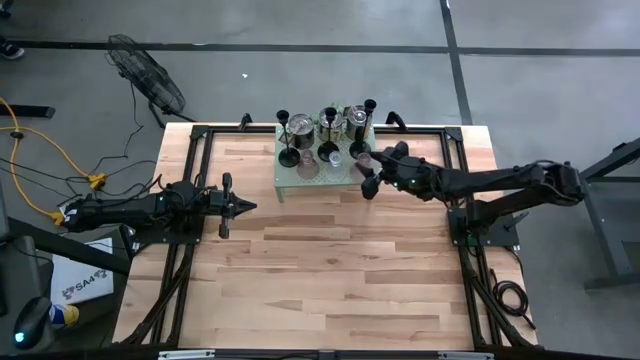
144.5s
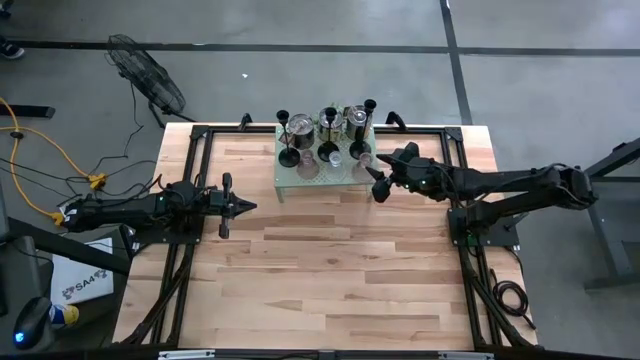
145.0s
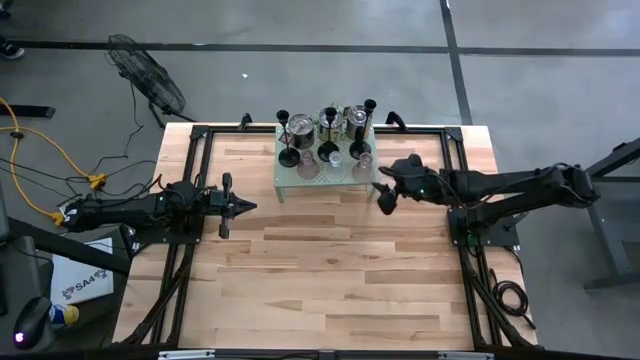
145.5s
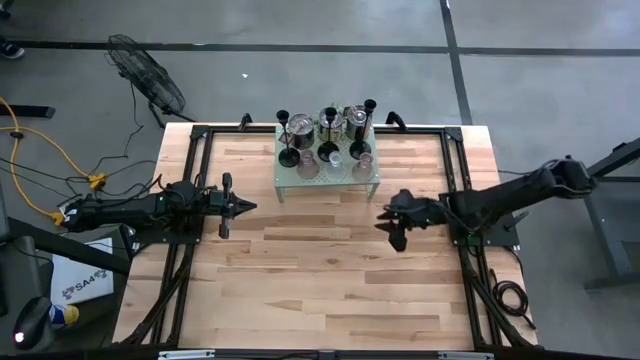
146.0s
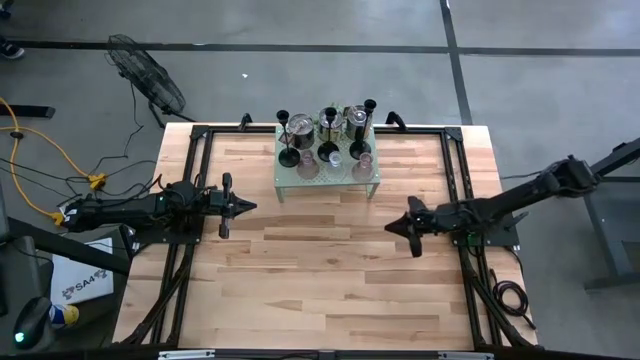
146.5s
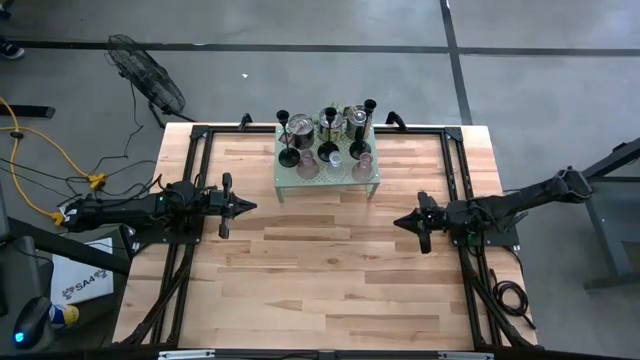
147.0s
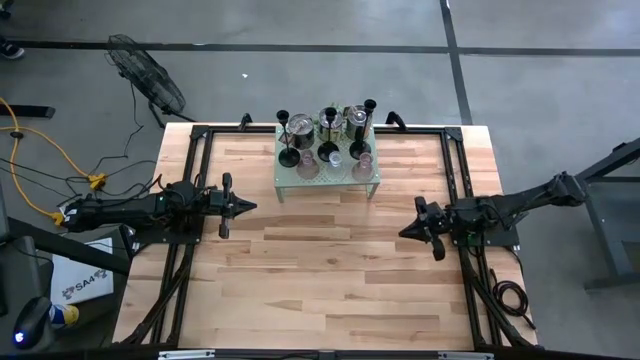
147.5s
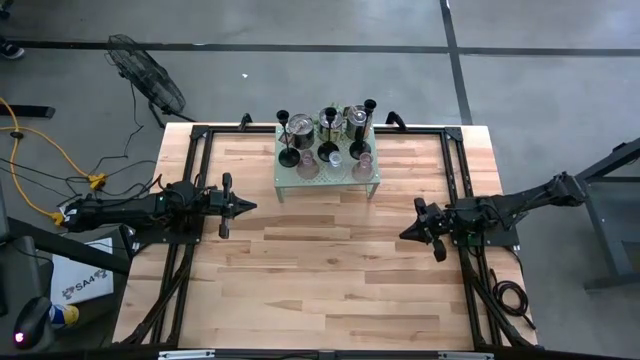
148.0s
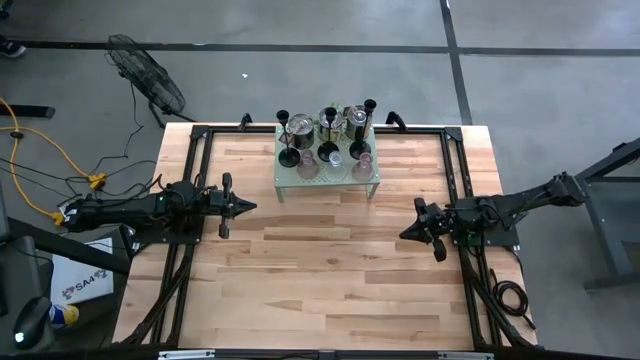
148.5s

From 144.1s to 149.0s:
Task: Pick & Place candle stick holders
Return to Home Position

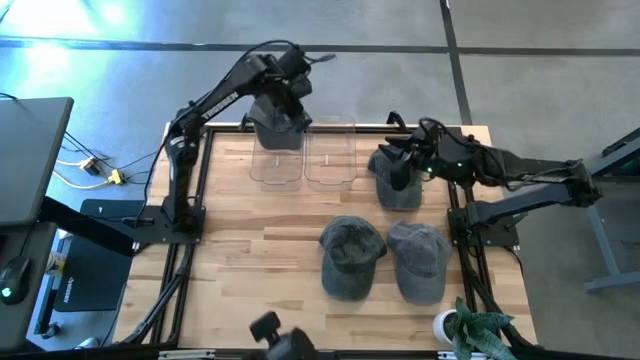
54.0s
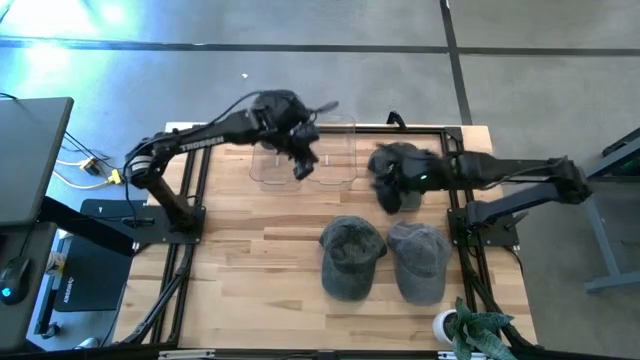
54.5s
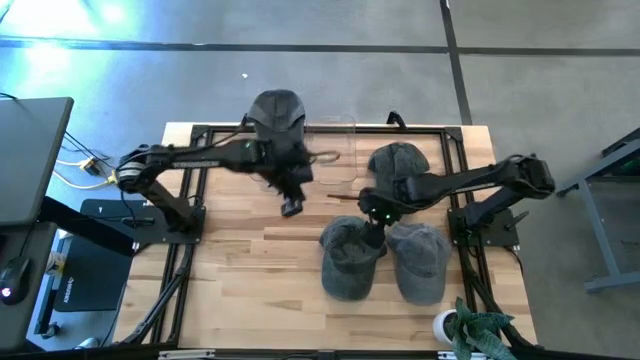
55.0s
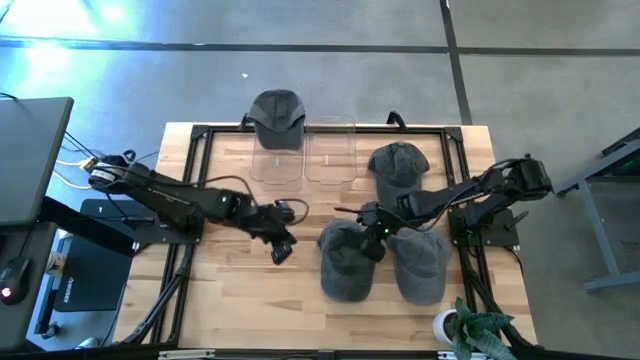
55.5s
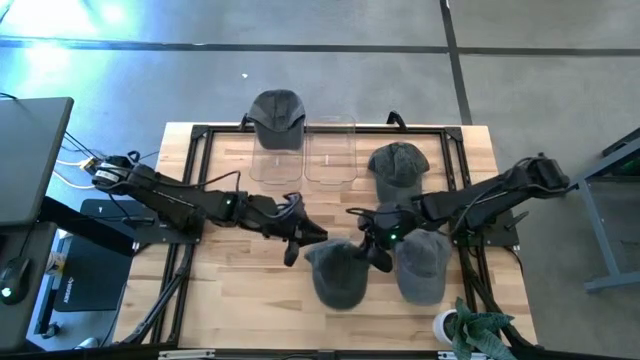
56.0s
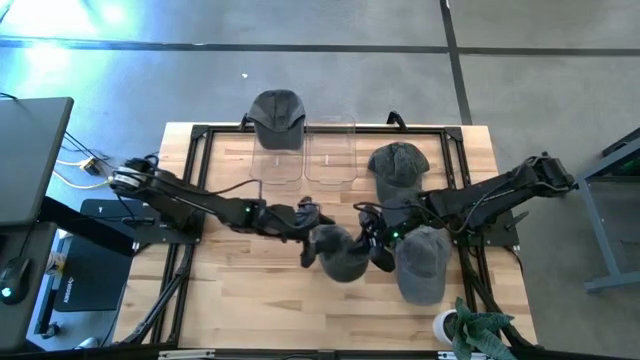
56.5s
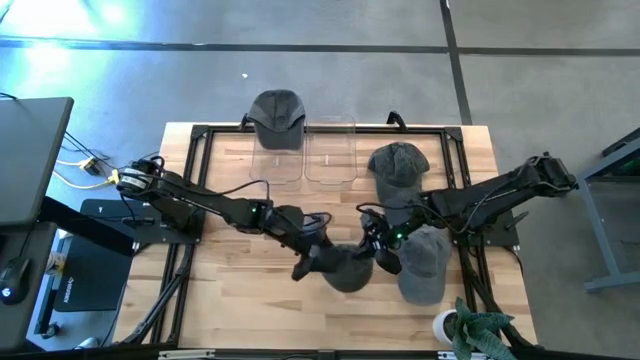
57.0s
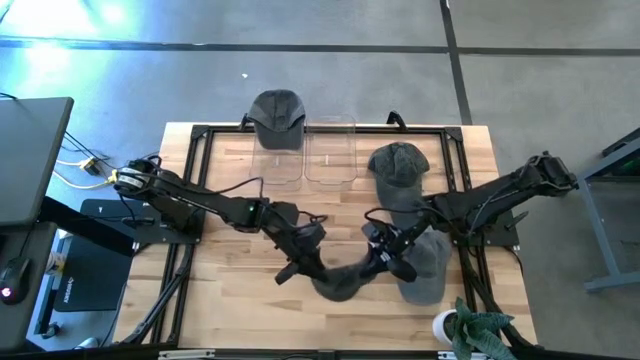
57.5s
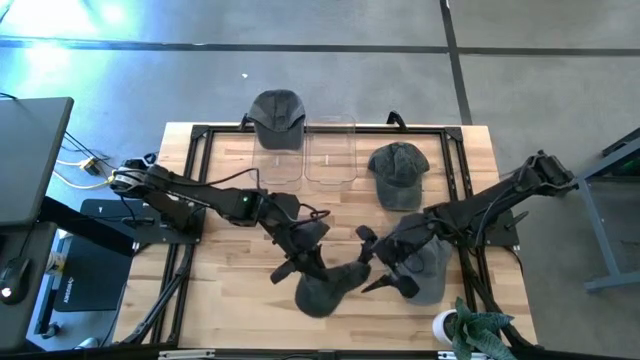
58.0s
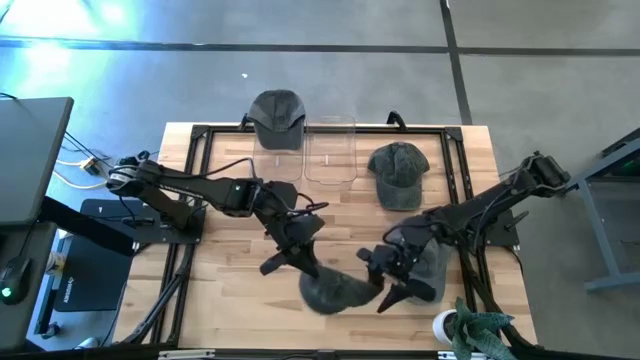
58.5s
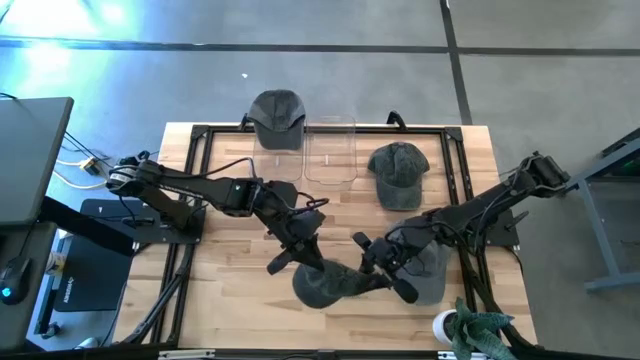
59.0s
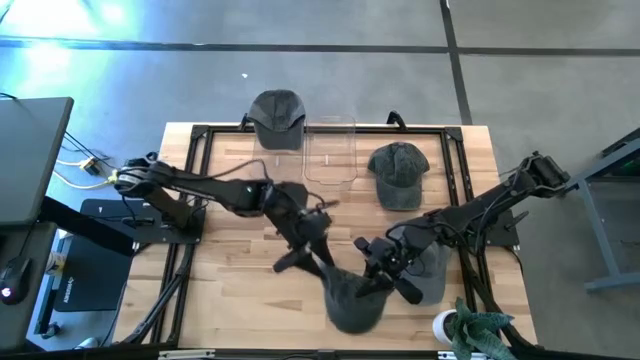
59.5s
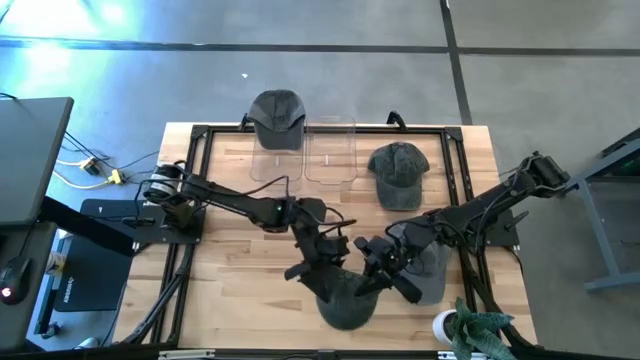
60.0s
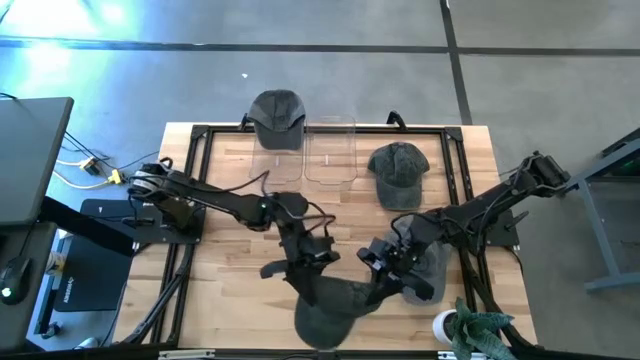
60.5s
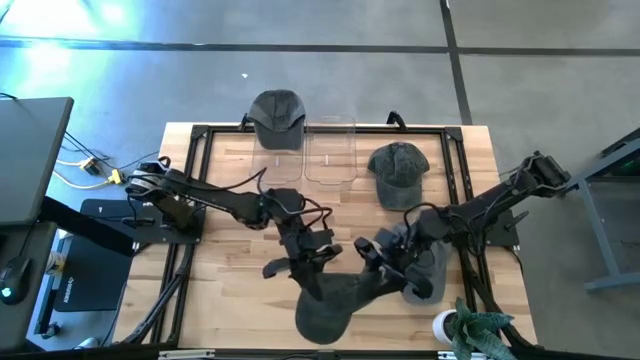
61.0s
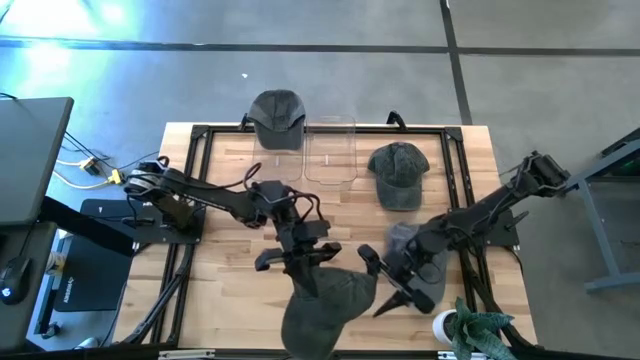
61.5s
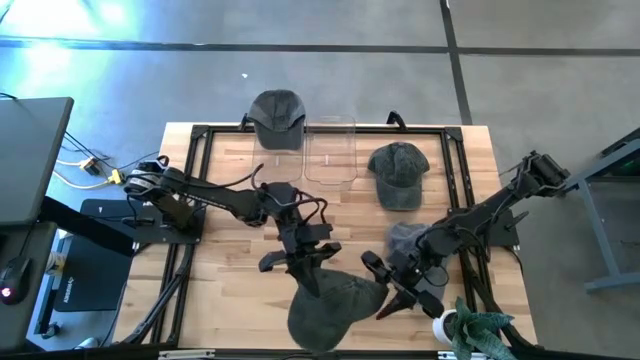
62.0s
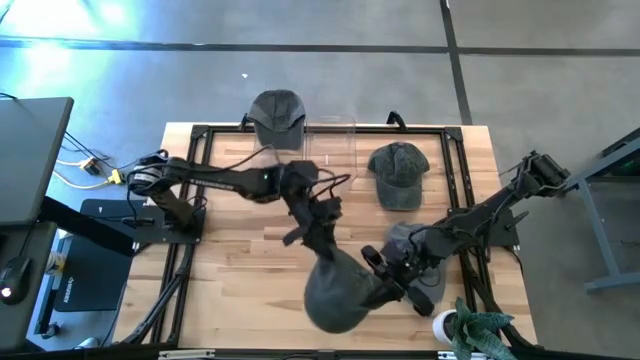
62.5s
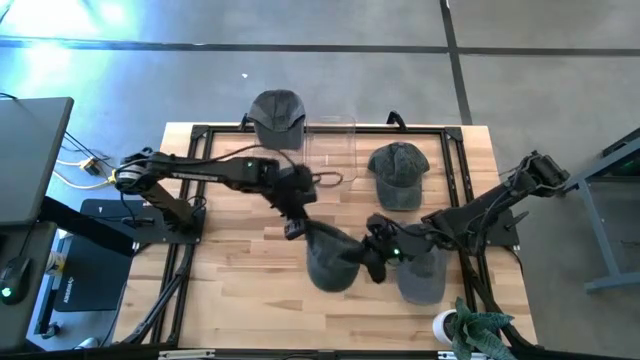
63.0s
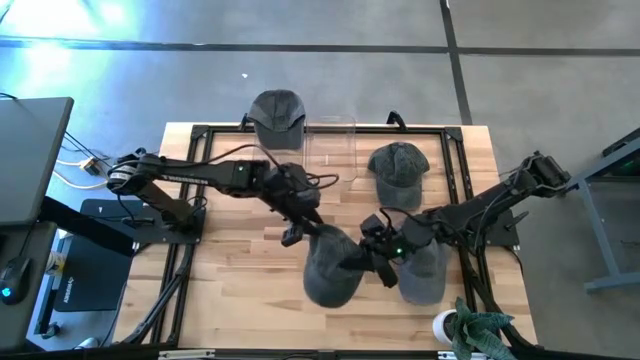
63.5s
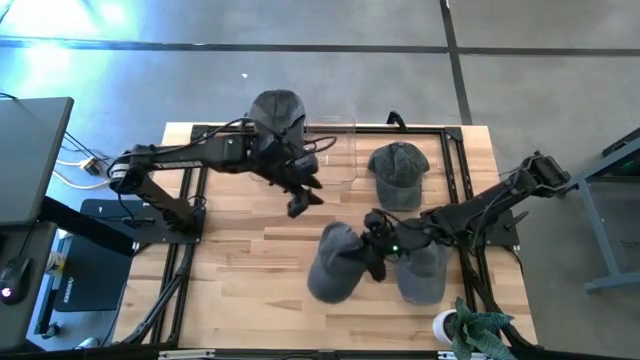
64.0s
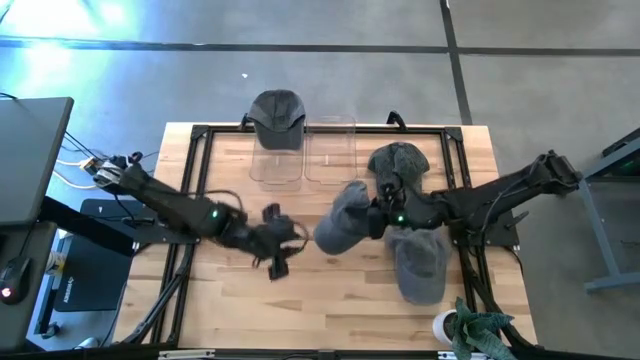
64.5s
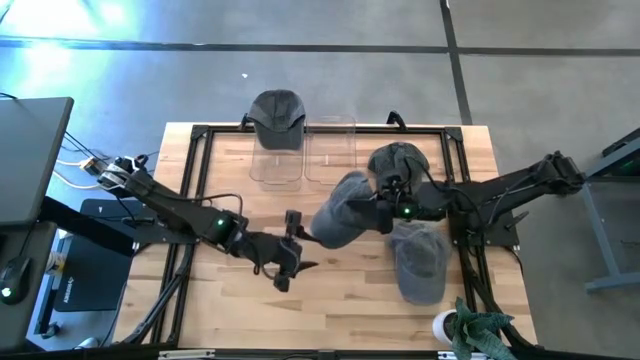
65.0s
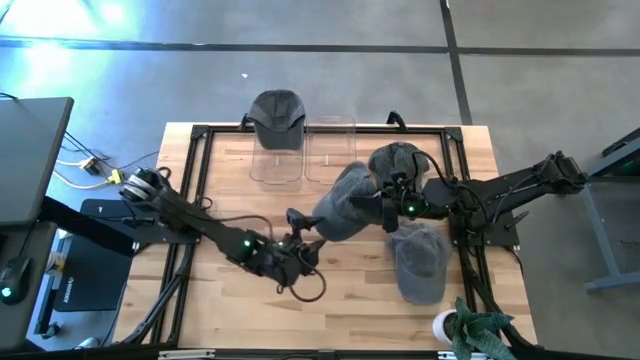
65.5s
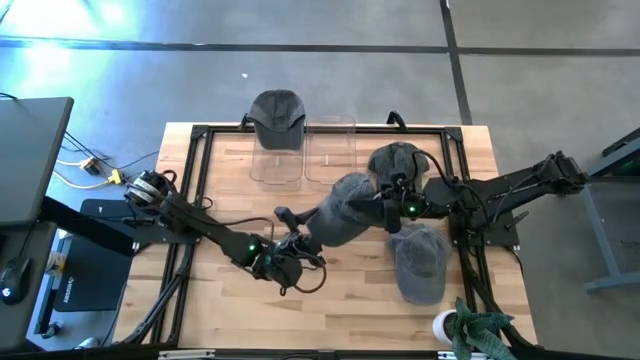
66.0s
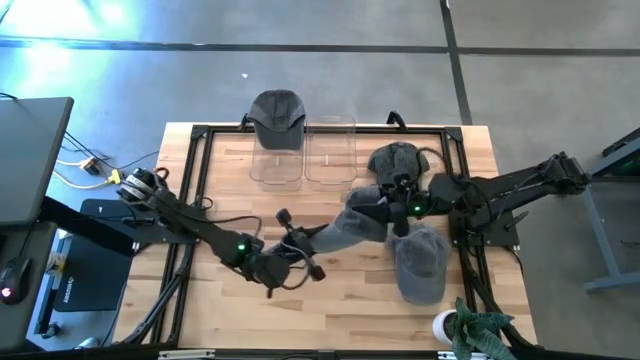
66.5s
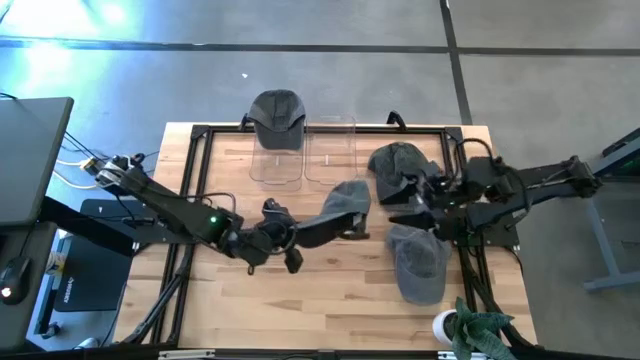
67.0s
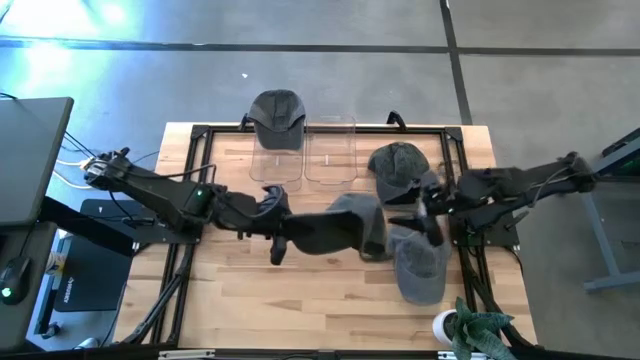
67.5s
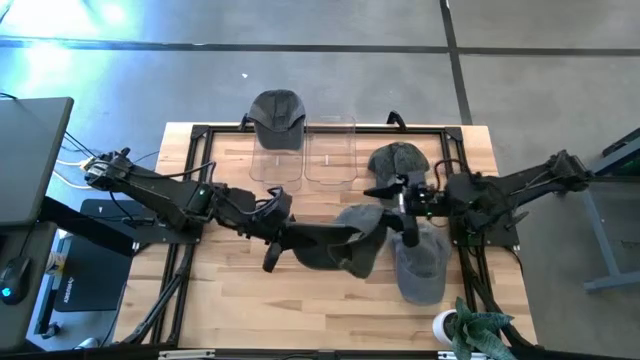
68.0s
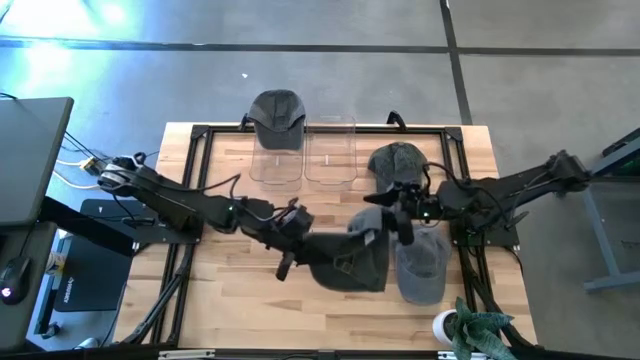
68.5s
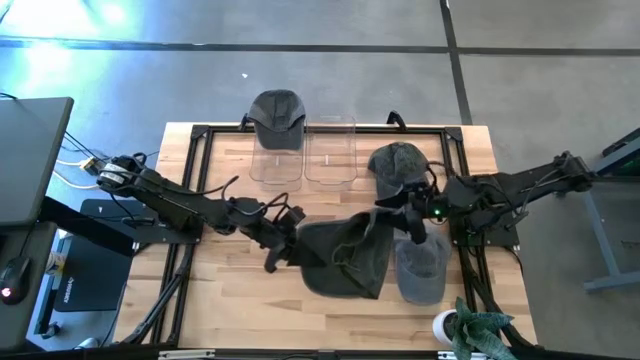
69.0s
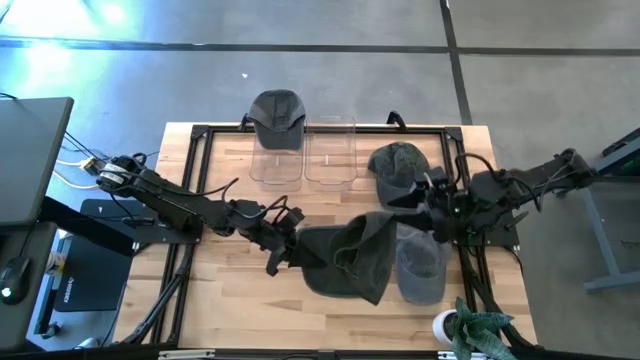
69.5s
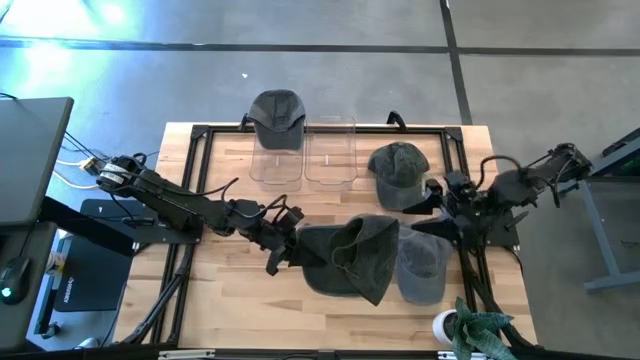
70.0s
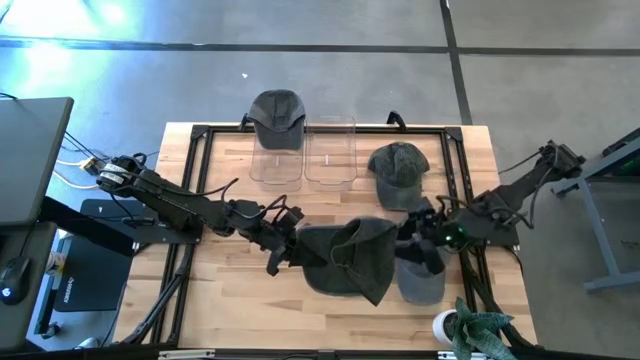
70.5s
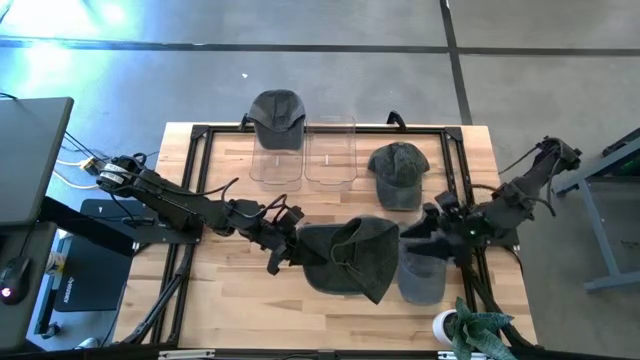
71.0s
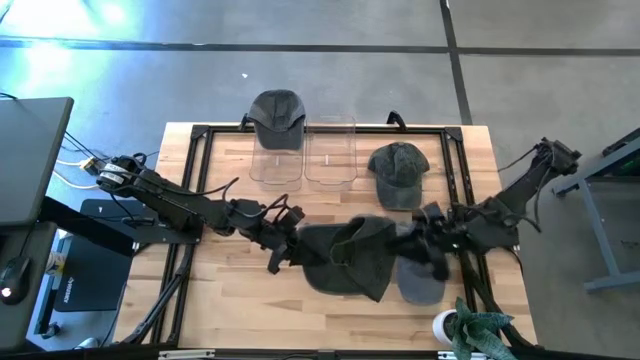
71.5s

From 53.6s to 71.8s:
Task: Pick & Place hat
Put the bottom black cap into the right transparent bin
